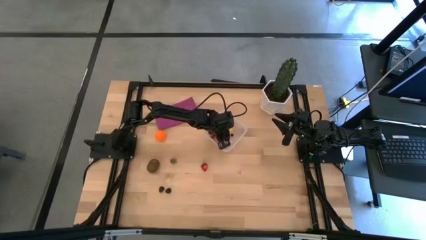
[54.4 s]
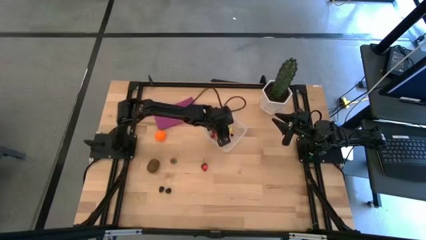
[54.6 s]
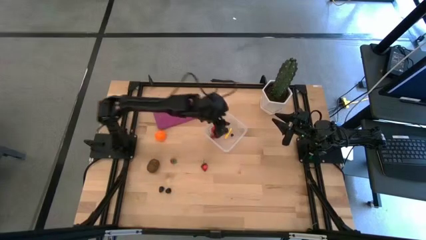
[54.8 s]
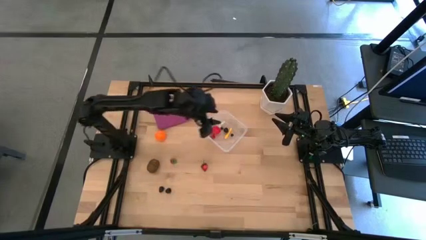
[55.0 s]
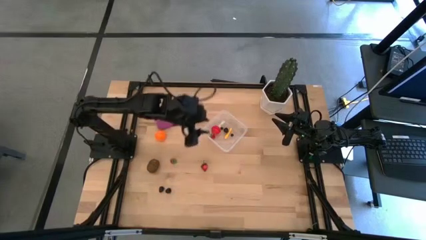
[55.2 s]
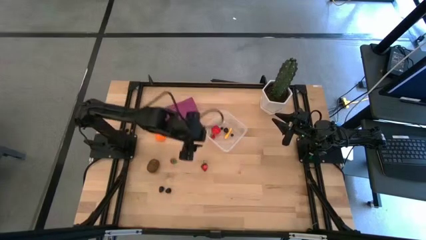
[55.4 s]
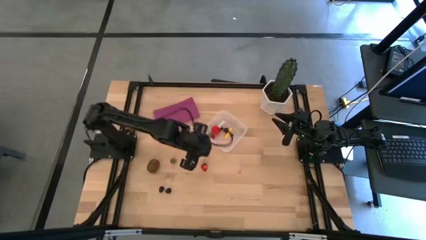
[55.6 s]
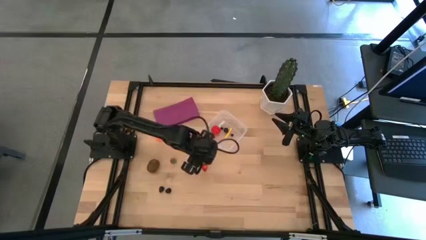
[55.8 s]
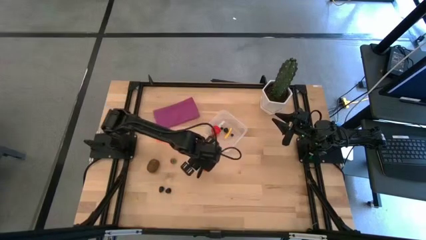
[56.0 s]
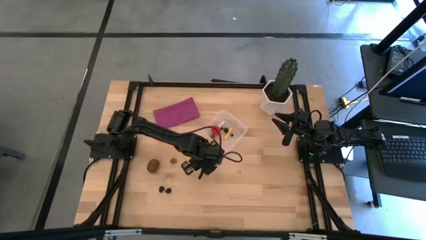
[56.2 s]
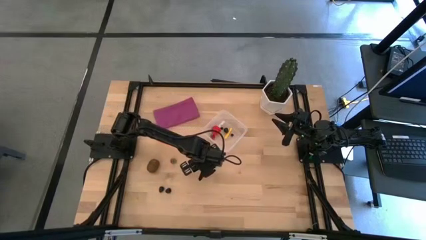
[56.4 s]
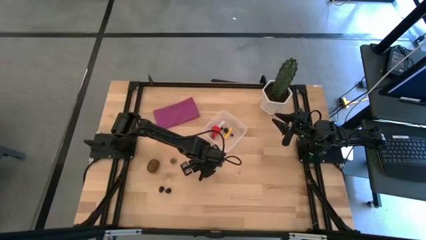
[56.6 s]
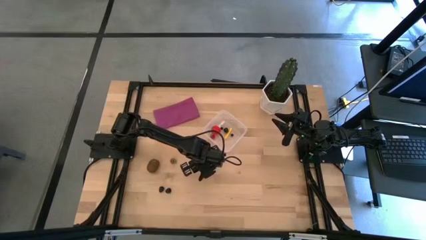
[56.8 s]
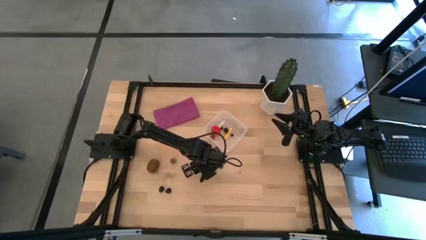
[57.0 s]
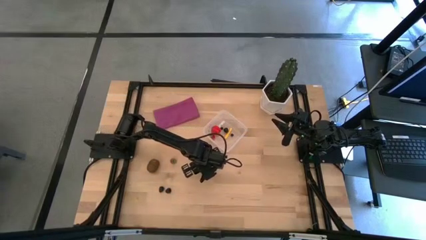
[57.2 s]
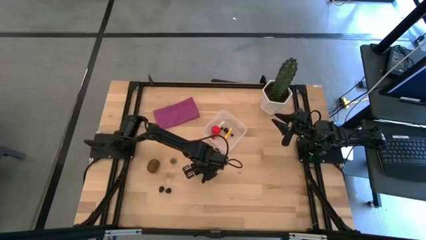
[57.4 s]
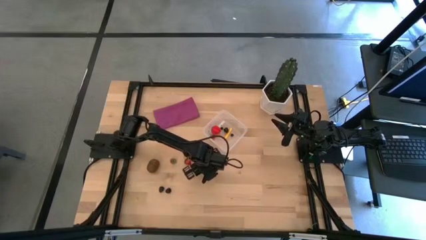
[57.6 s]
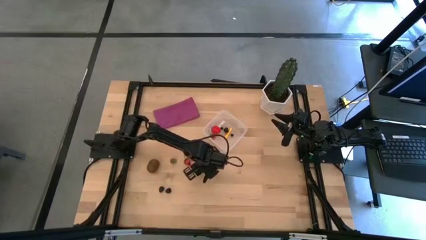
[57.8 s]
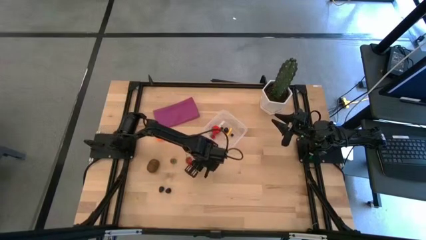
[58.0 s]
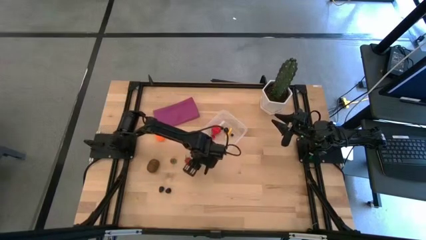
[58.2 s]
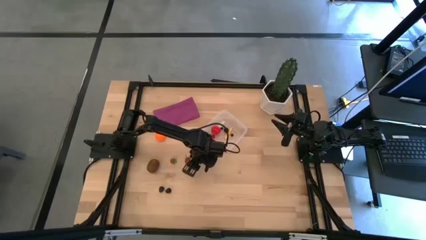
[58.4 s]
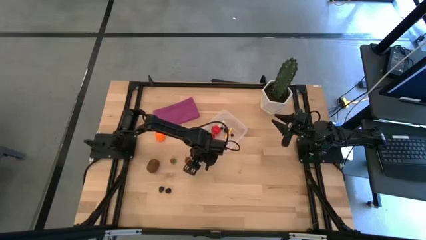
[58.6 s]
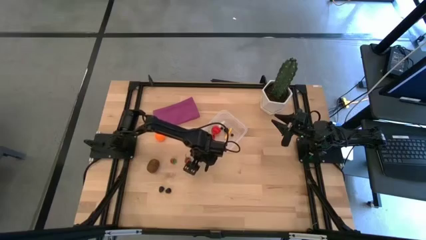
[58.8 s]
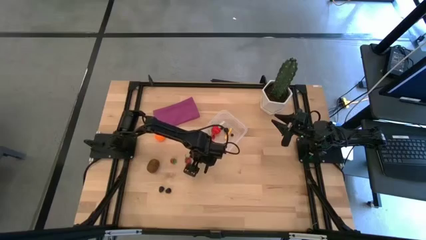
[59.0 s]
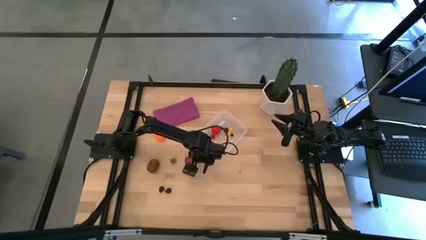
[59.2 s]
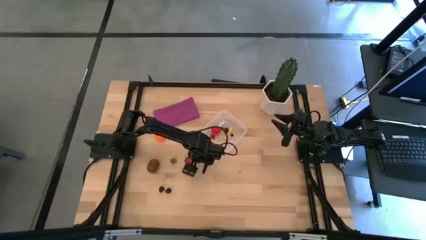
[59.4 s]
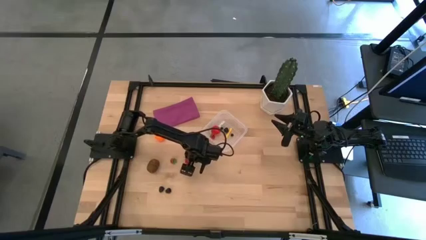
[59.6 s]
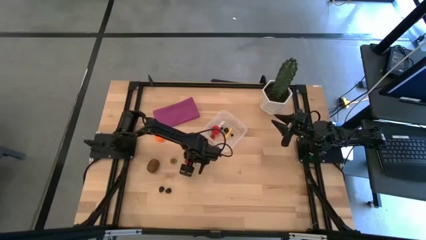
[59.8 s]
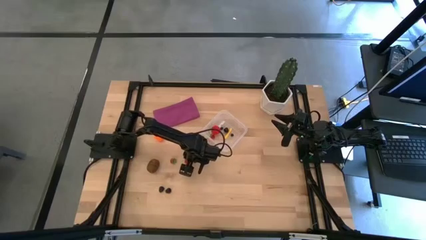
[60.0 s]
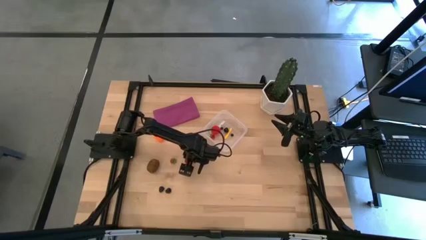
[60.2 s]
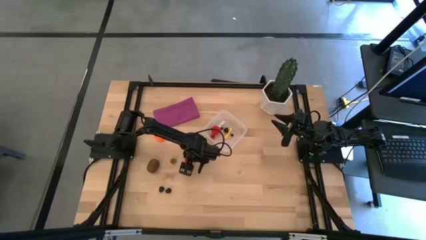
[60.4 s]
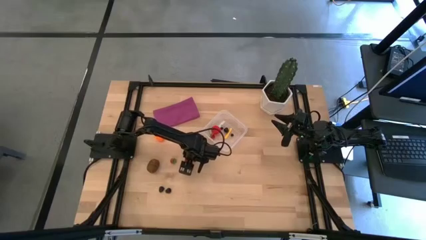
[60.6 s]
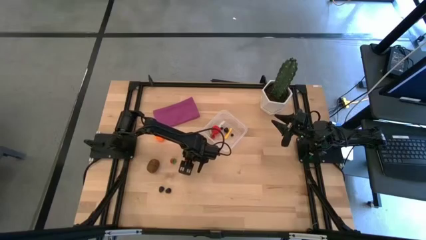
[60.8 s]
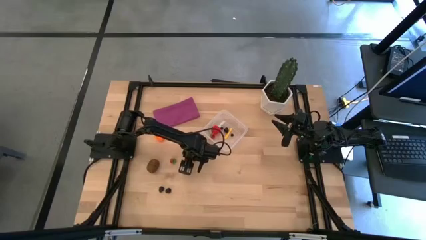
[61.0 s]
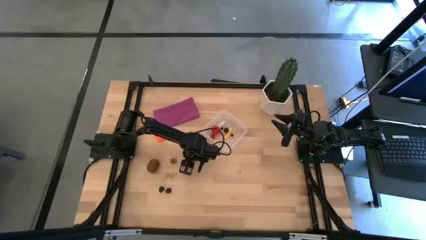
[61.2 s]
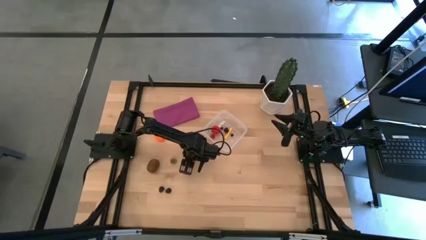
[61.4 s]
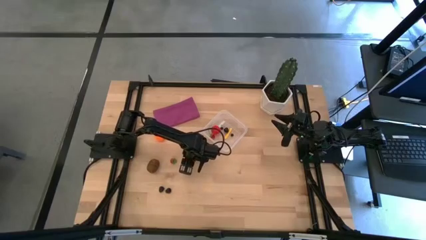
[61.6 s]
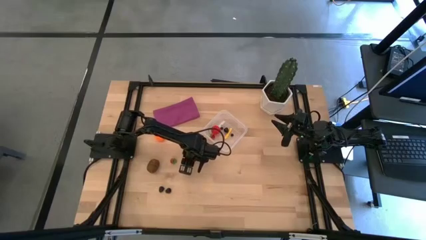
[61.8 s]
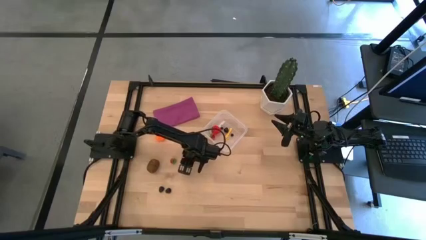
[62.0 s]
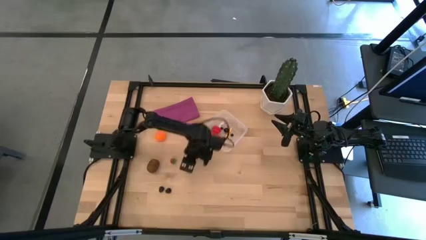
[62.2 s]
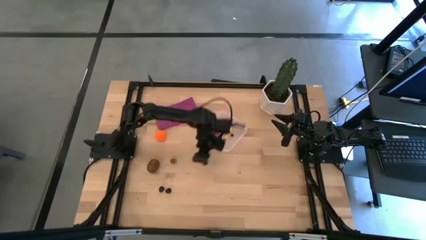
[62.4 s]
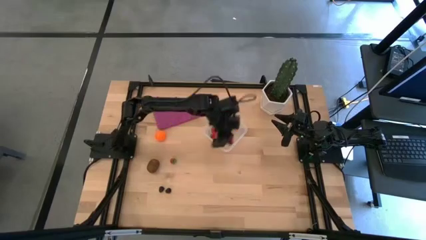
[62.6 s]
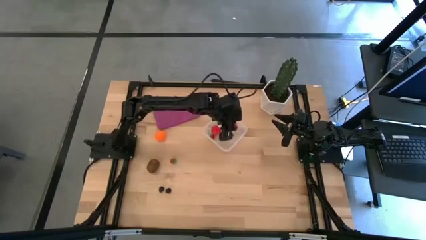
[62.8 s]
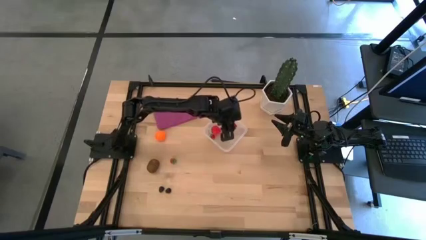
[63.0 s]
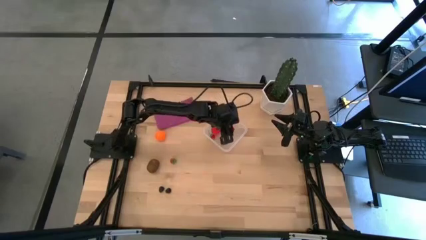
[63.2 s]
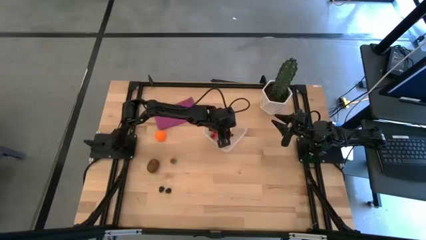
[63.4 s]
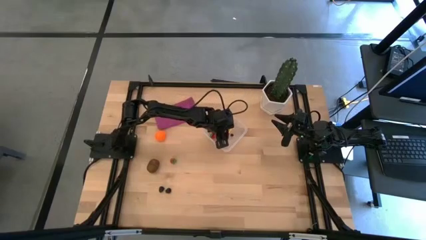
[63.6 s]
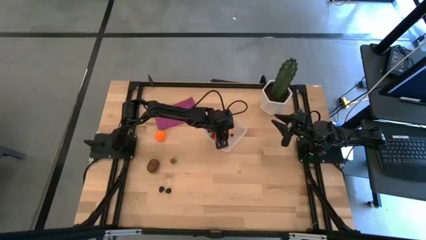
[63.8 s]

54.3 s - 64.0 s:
Task: Pick and placing Produce into tupperware
Put the right red strawberry into the transparent container

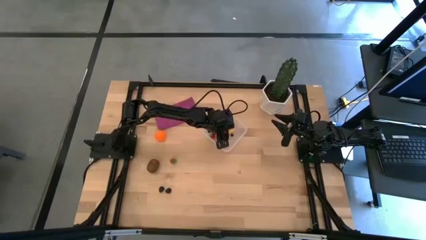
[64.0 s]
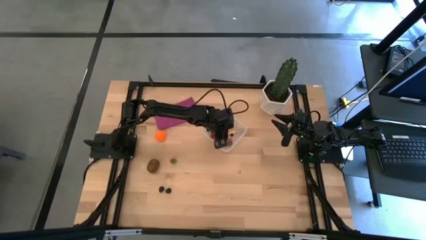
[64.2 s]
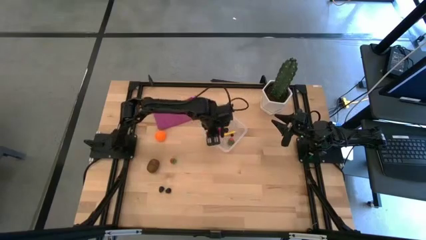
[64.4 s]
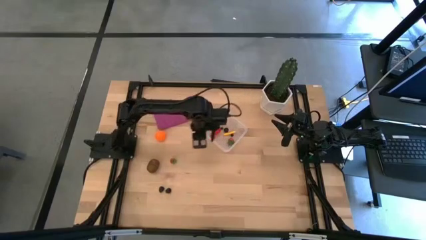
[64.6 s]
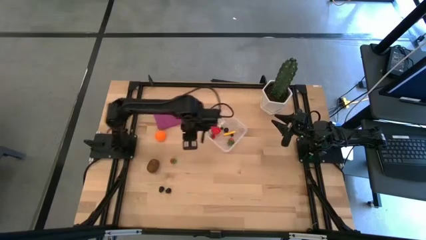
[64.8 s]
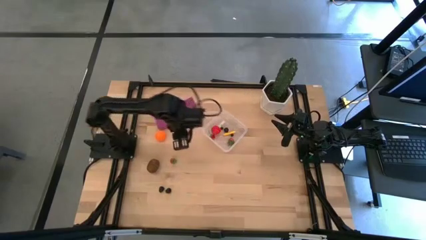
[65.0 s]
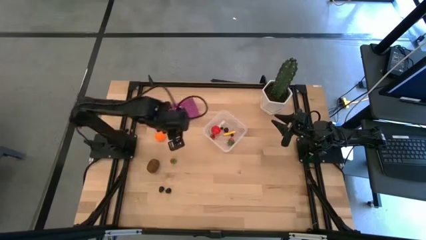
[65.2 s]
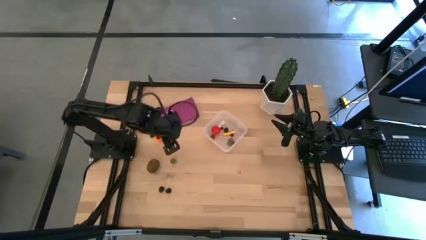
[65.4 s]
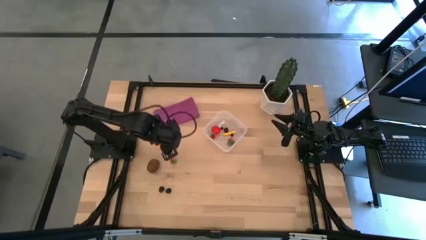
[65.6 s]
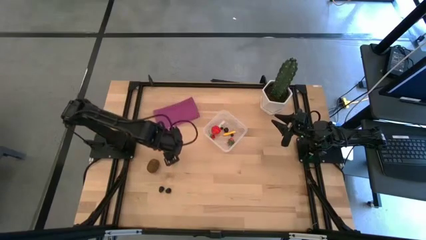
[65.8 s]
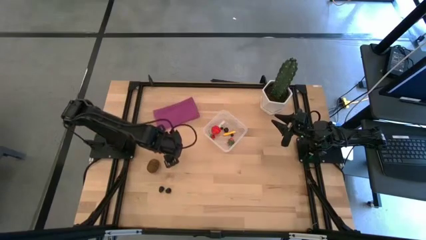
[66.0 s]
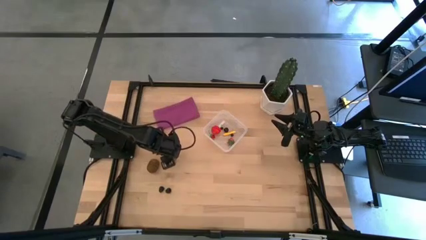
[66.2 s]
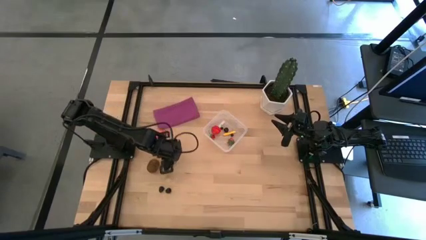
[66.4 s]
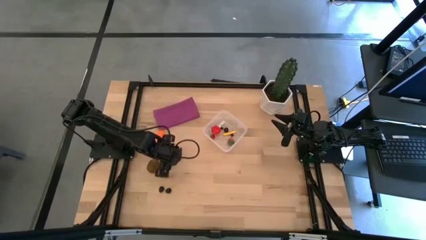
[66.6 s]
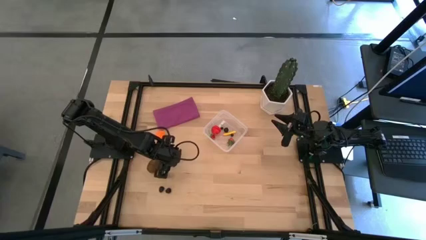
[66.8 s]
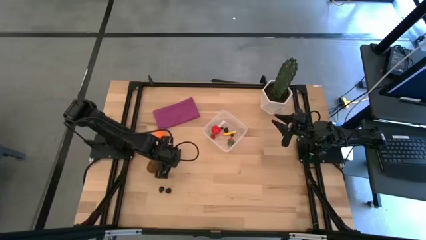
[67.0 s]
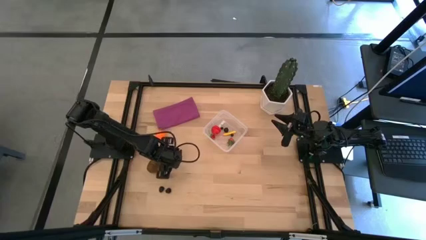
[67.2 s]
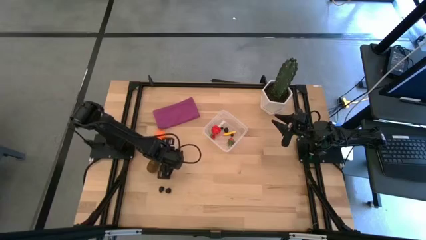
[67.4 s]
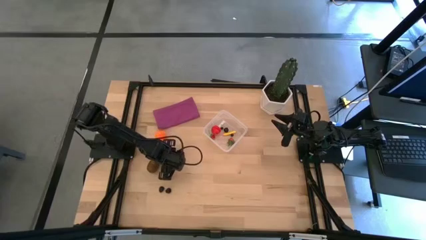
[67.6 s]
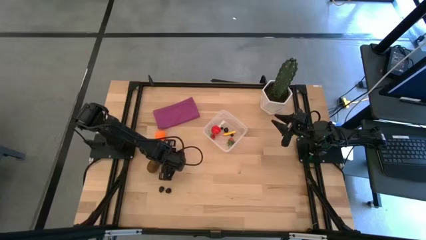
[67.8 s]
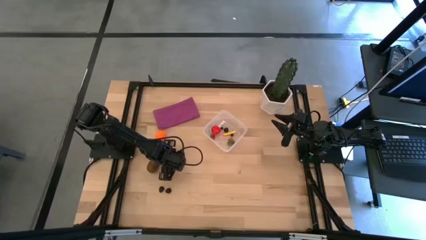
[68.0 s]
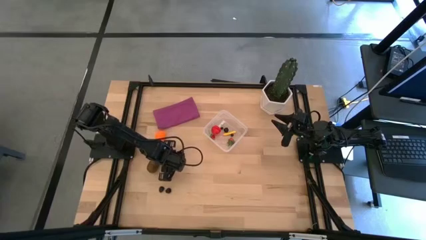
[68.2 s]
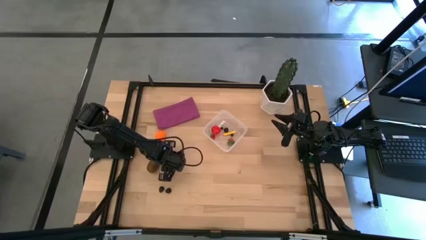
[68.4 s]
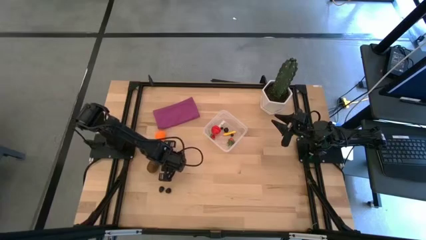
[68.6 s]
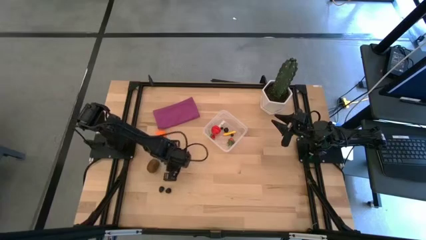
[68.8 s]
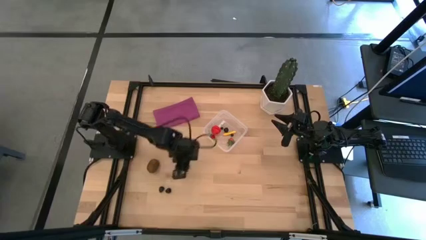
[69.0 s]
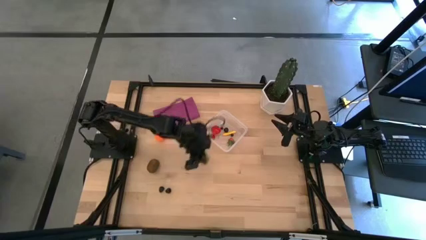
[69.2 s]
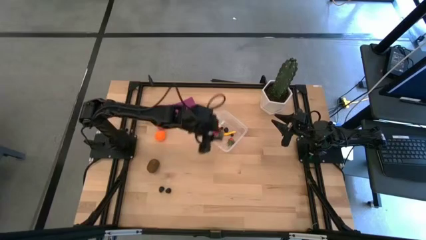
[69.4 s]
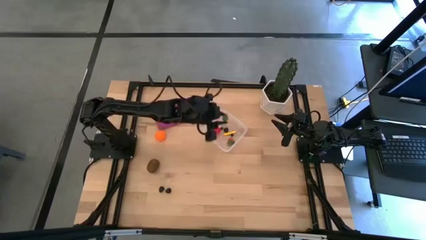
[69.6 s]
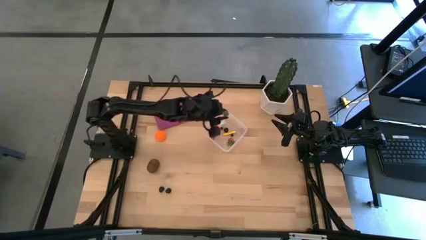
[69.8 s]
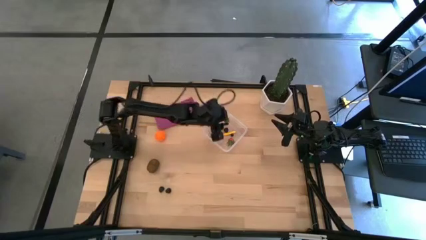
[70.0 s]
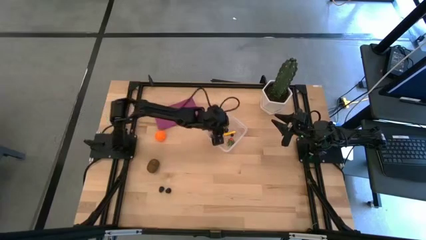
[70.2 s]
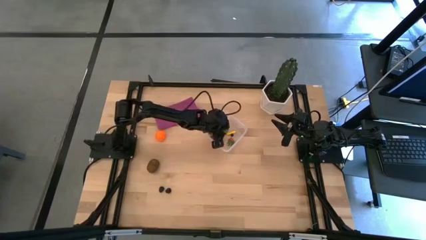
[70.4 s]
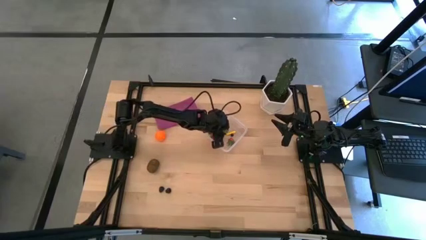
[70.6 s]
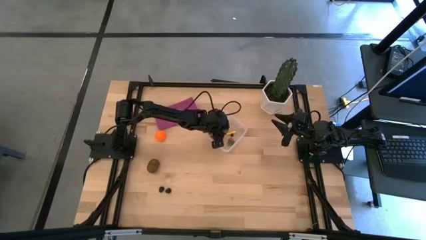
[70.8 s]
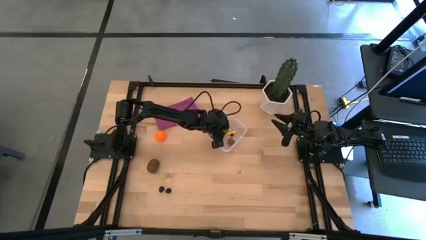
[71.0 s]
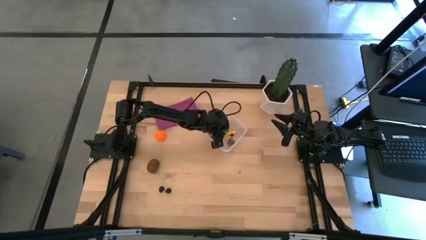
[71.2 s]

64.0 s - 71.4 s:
Put the red strawberry into the transparent container
